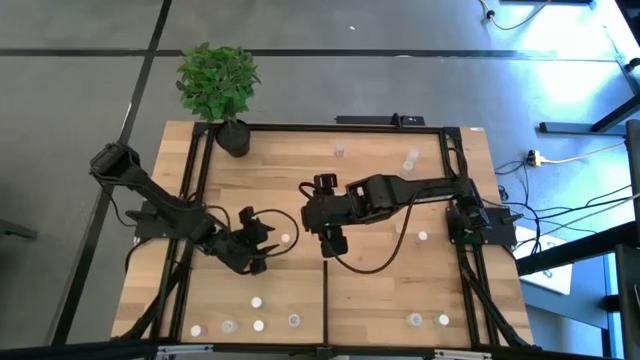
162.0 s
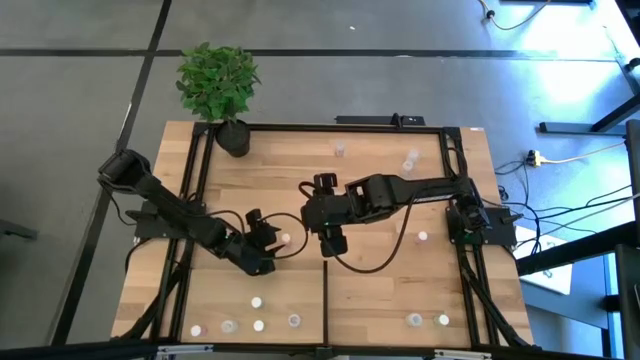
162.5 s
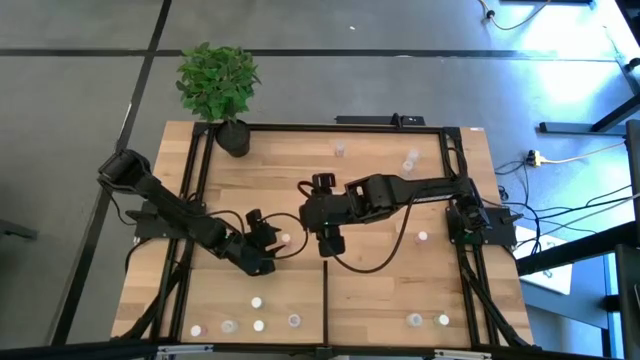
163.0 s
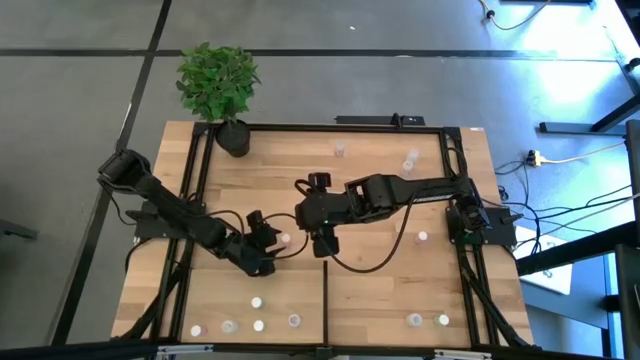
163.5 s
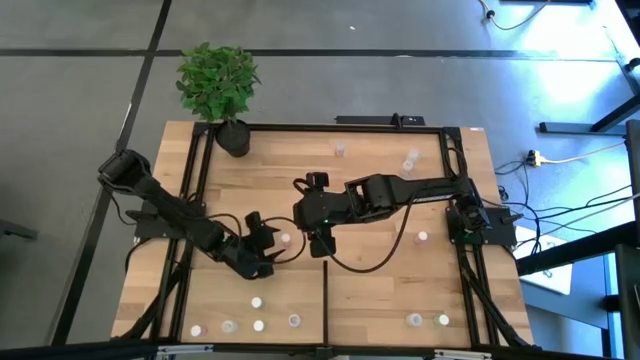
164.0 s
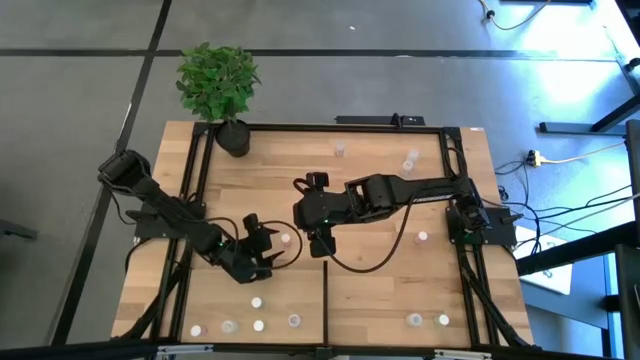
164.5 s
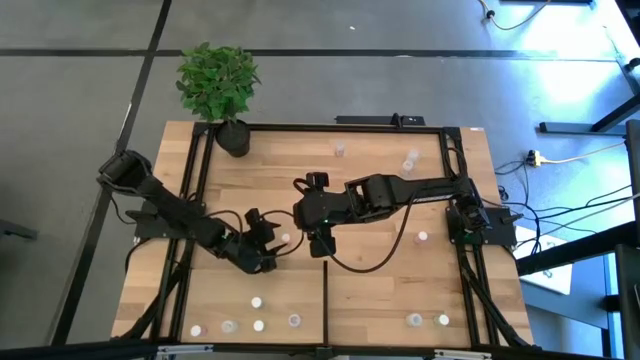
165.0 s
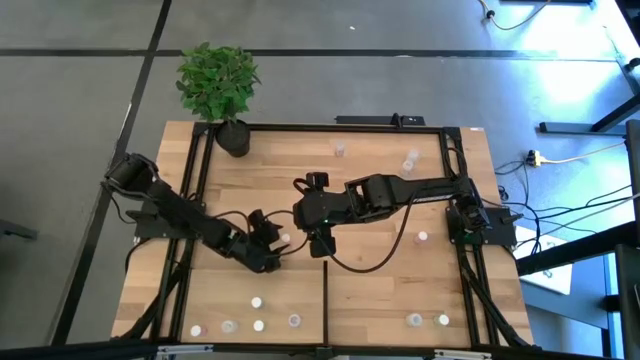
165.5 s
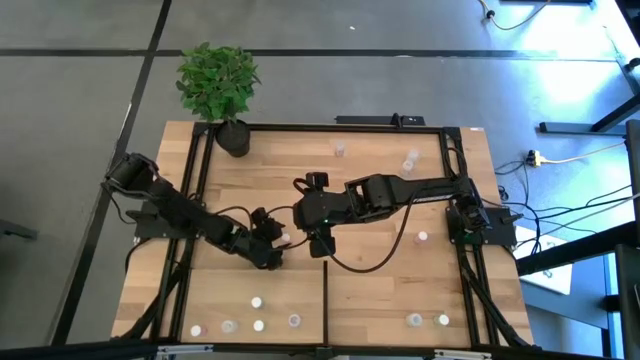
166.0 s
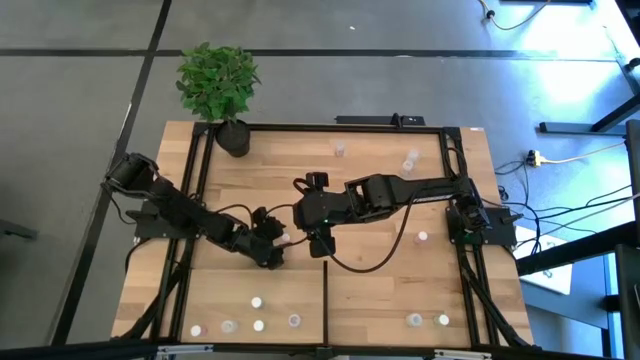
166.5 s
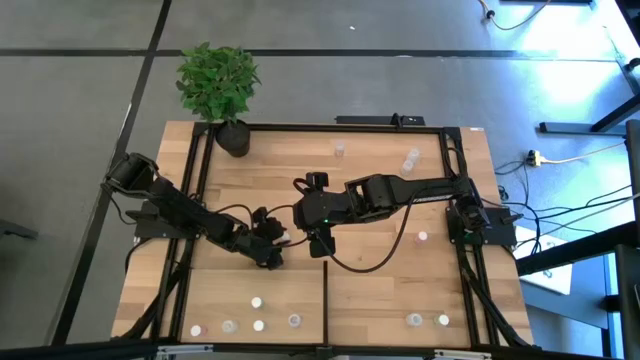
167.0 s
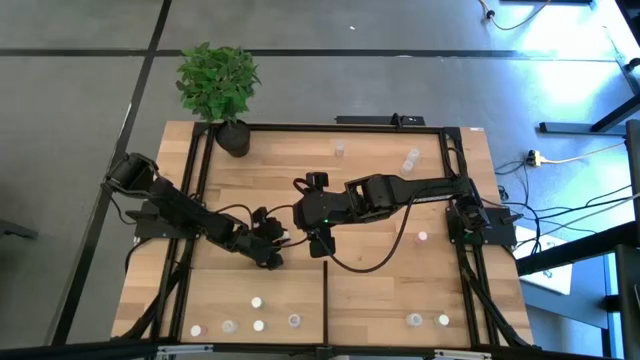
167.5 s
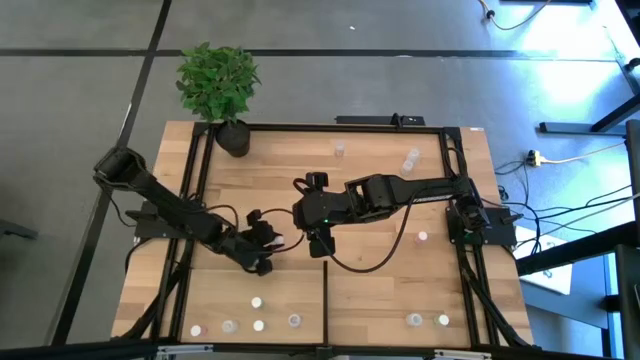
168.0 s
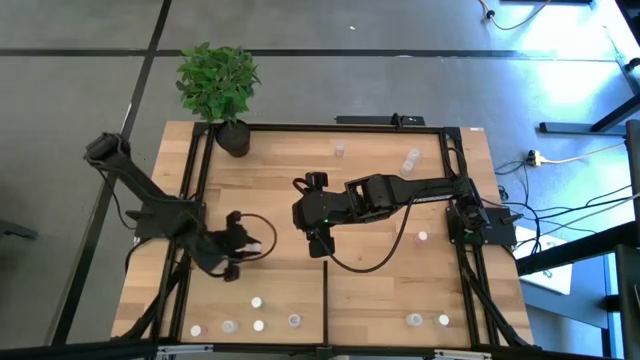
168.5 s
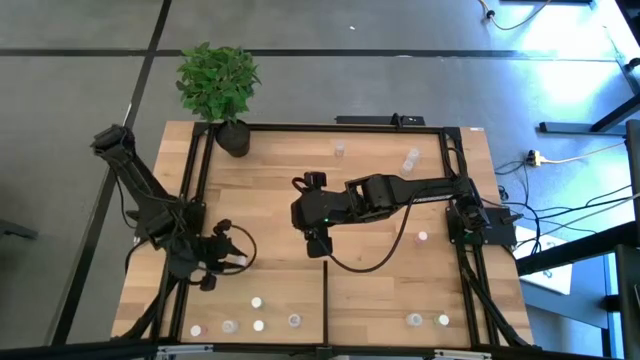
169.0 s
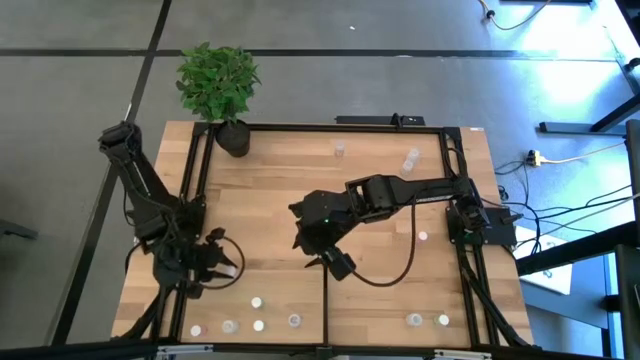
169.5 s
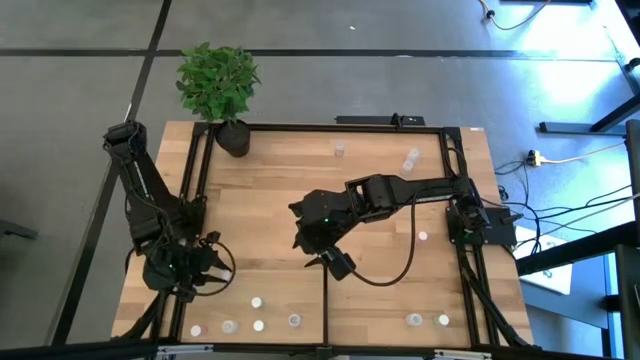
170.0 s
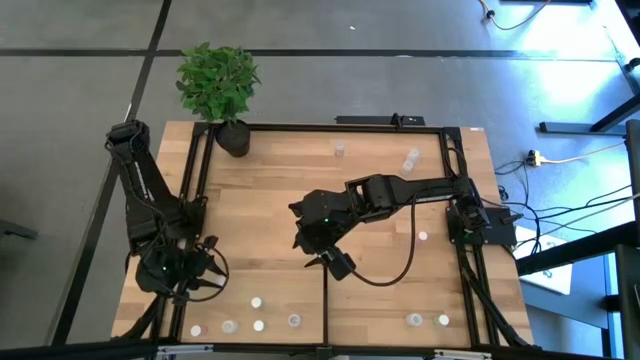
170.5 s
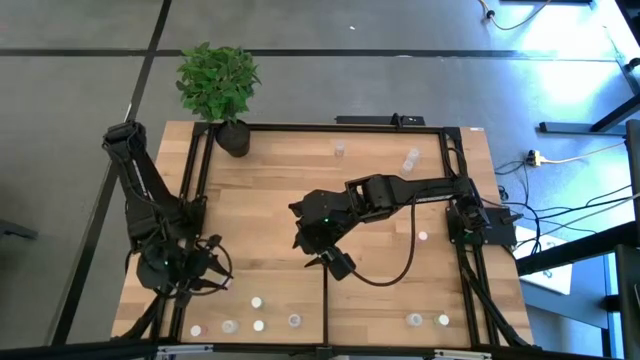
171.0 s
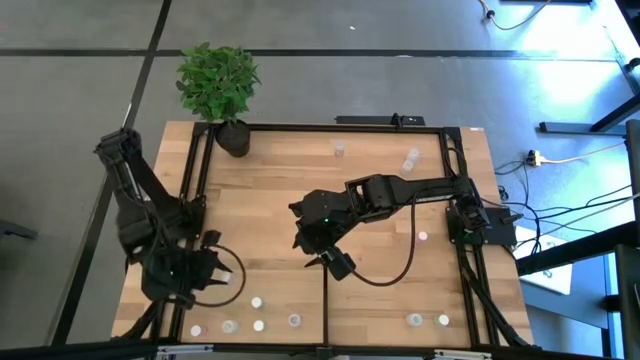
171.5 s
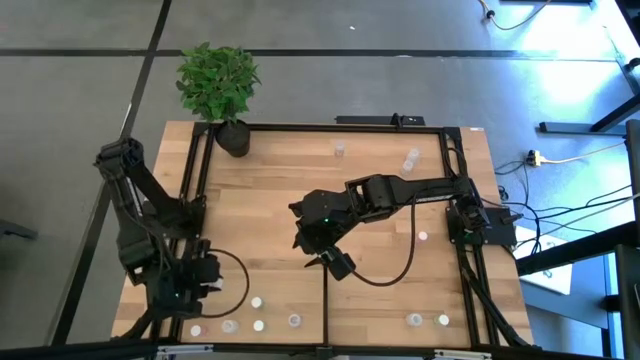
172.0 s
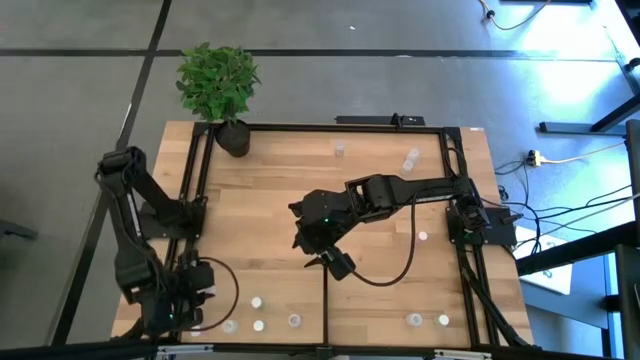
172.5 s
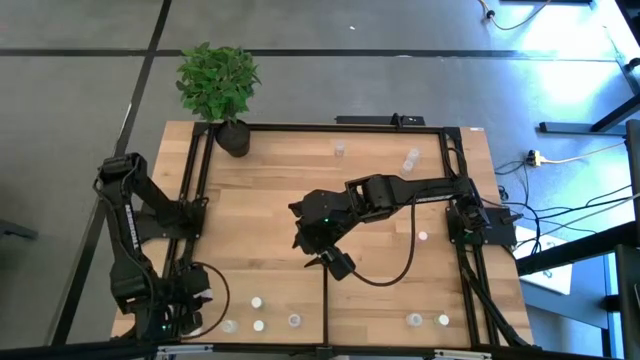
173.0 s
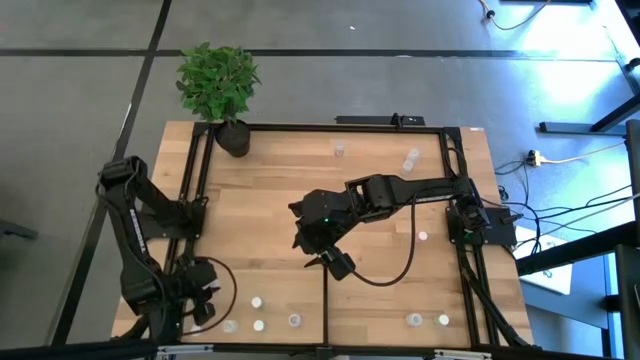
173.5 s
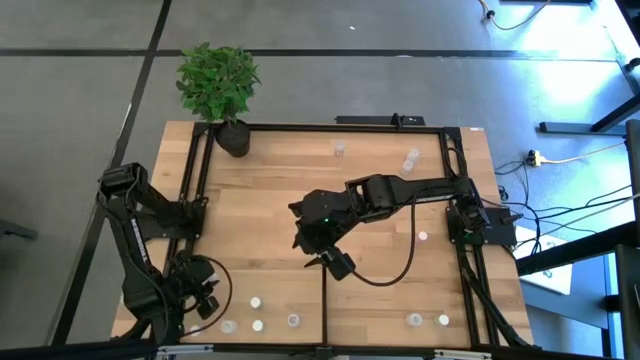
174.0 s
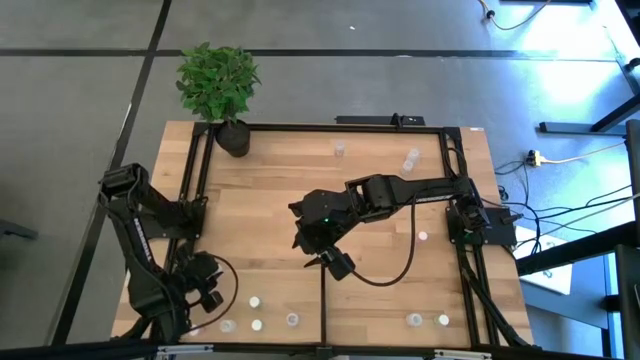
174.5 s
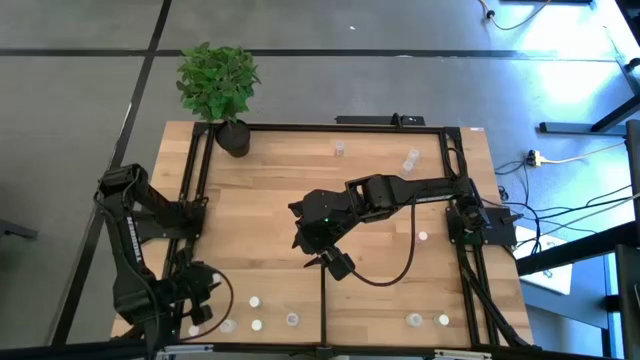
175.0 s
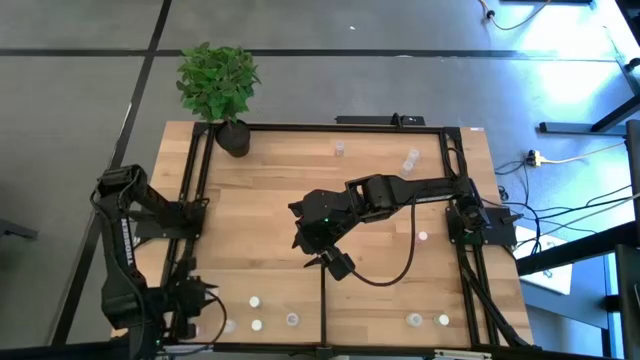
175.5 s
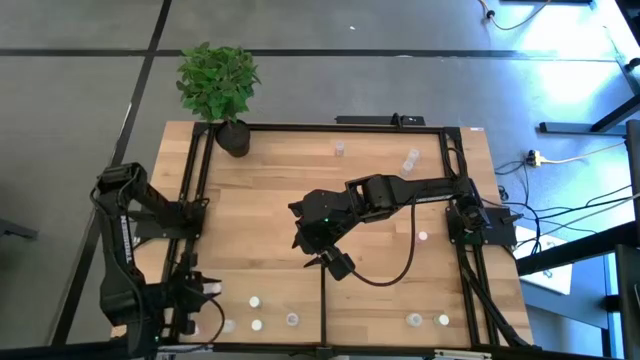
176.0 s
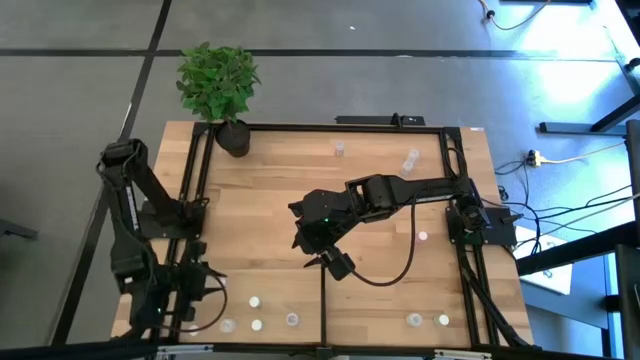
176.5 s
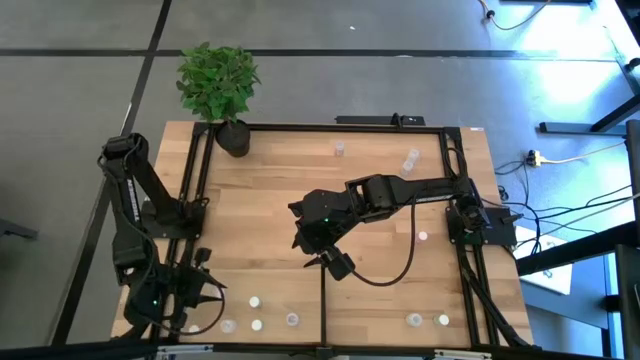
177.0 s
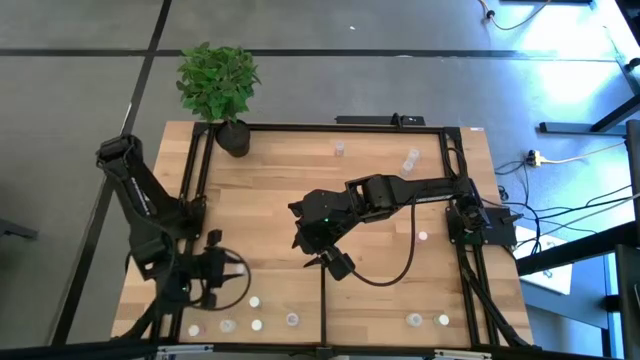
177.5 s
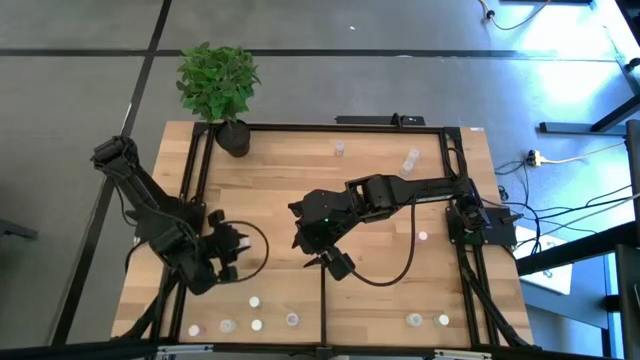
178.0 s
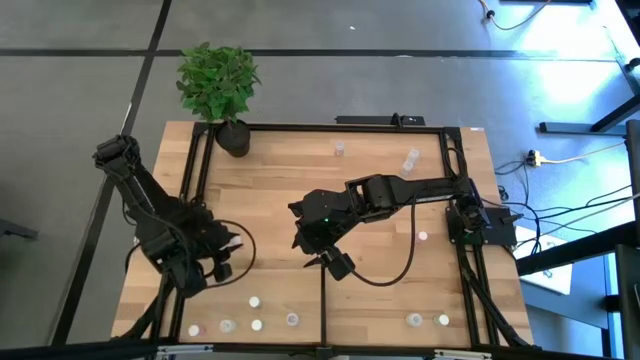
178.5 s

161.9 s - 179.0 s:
Task: Pick and place medicine bottles onto shelf by color
Put the bottom pink pill bottle on the shelf aligned with the other pink pill bottle

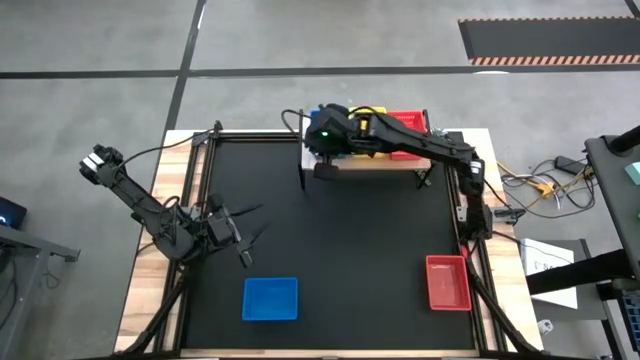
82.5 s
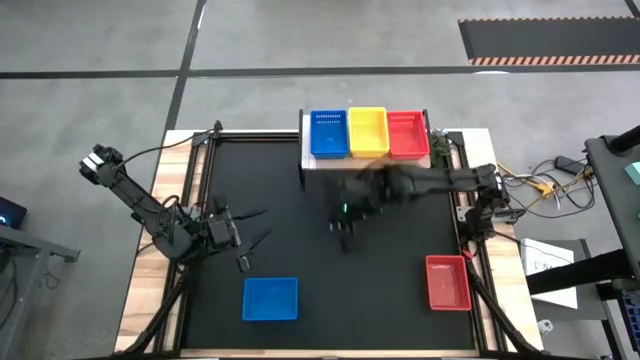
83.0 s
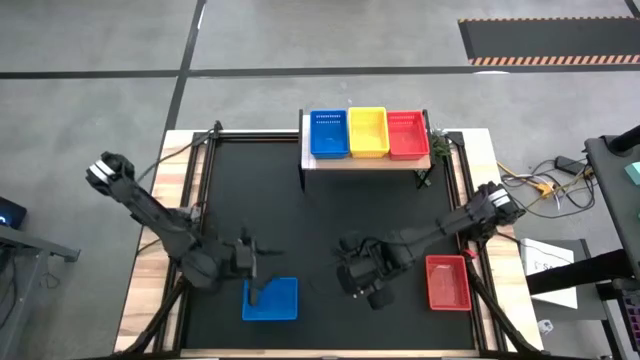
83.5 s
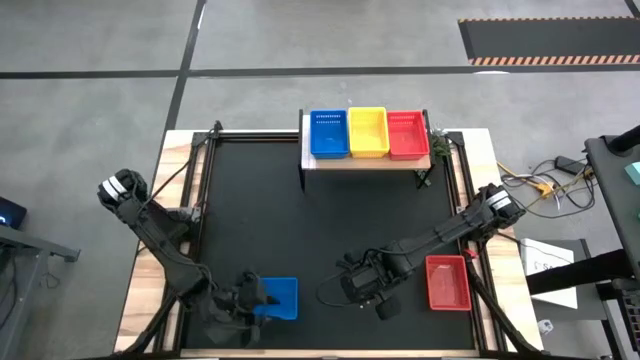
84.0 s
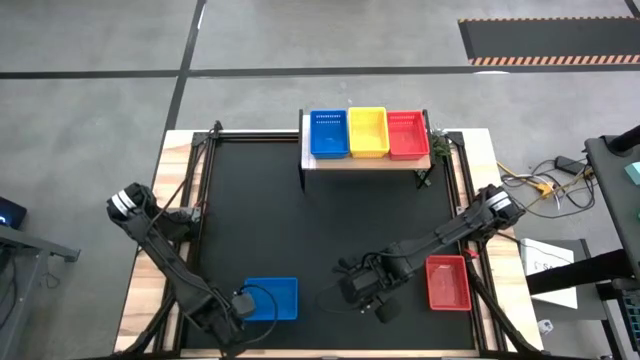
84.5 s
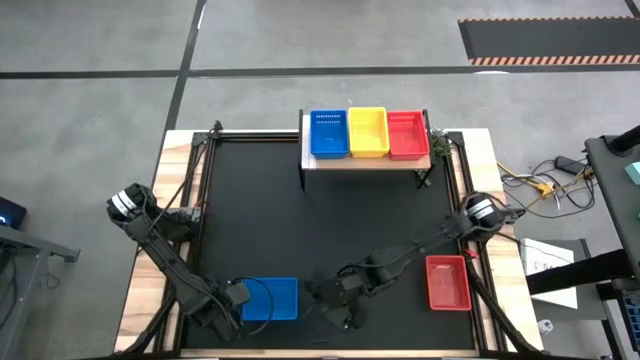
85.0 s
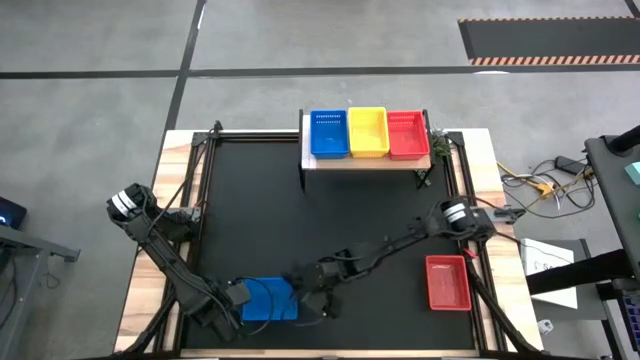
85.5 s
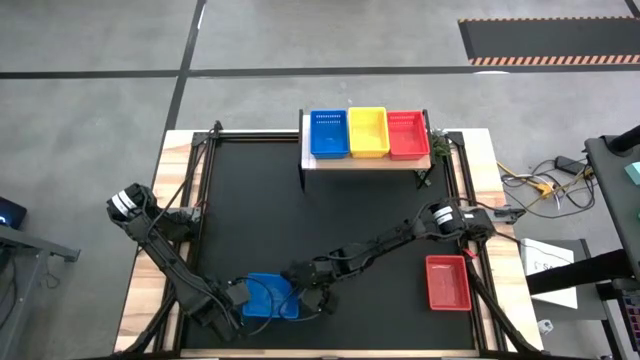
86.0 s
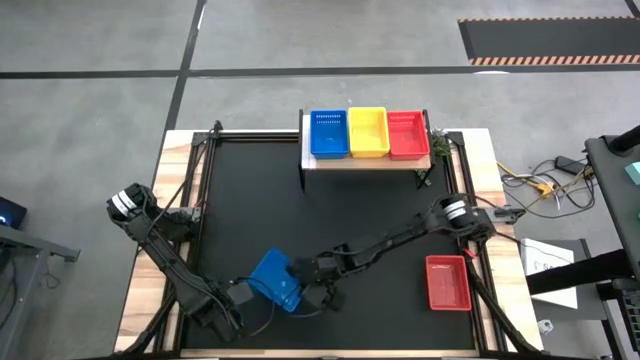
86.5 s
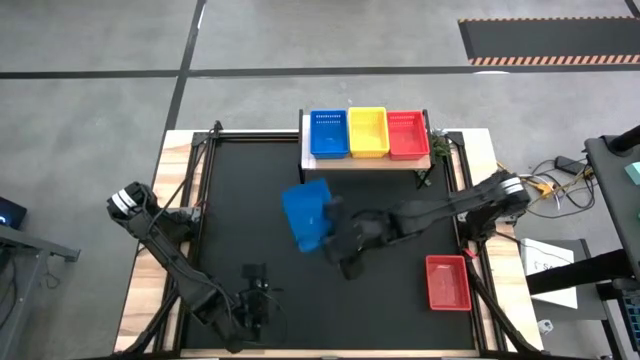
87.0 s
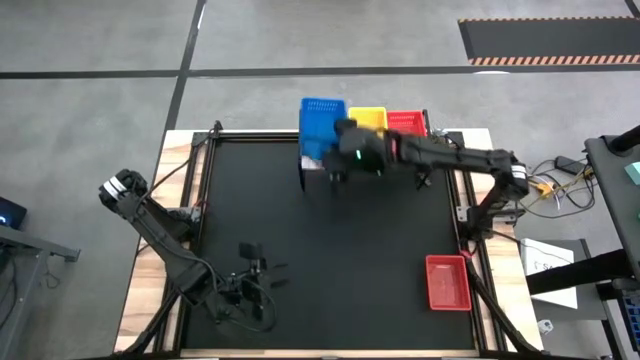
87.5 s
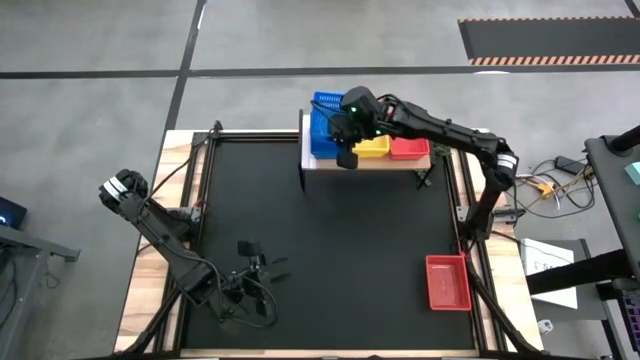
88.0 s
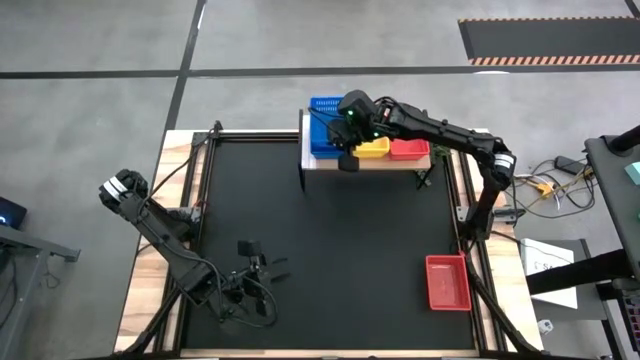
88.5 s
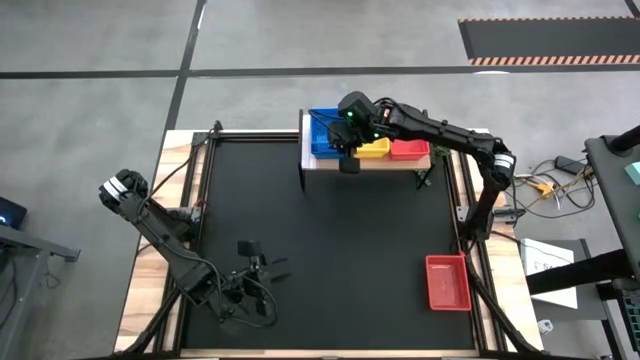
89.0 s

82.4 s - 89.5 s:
Task: Stack baskets on shelf by color
Stack the blue bin on top of the blue bin on the shelf
